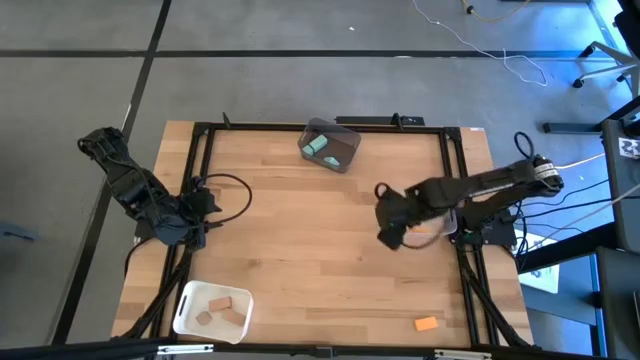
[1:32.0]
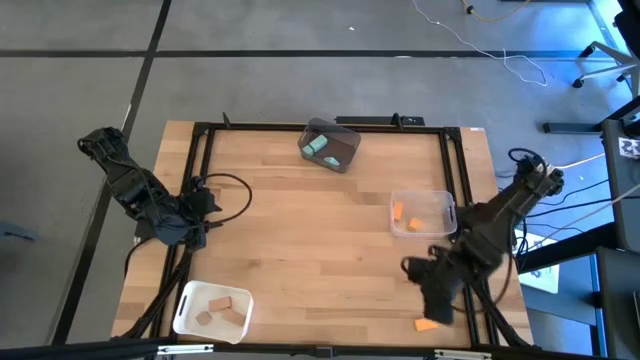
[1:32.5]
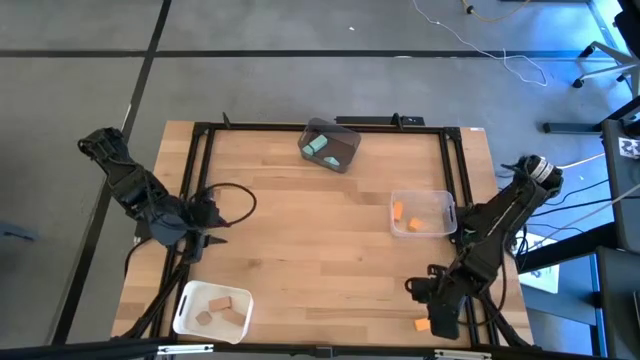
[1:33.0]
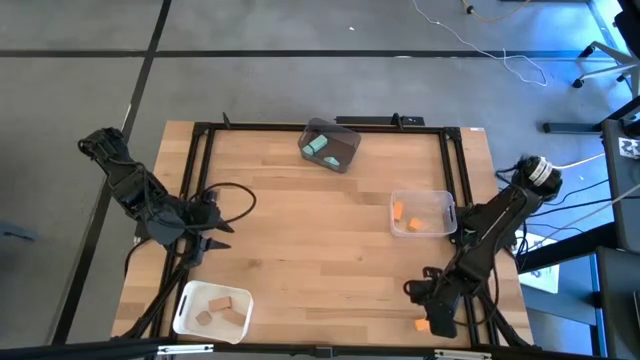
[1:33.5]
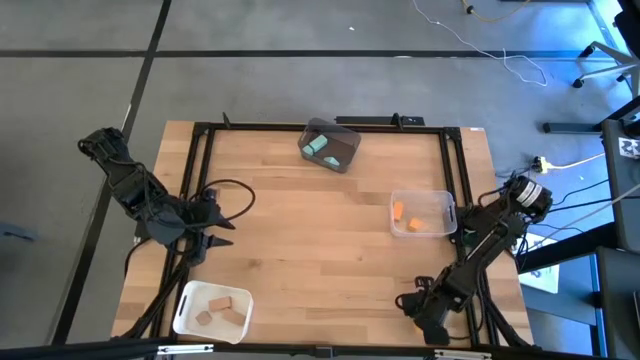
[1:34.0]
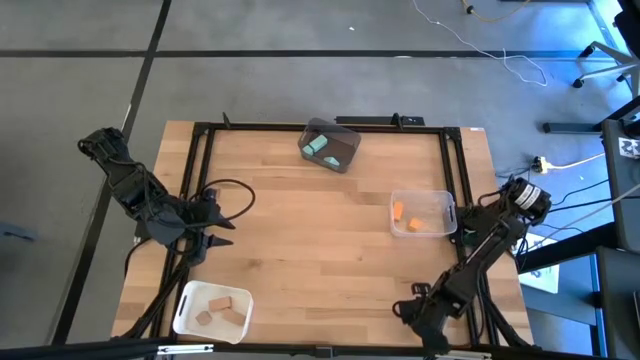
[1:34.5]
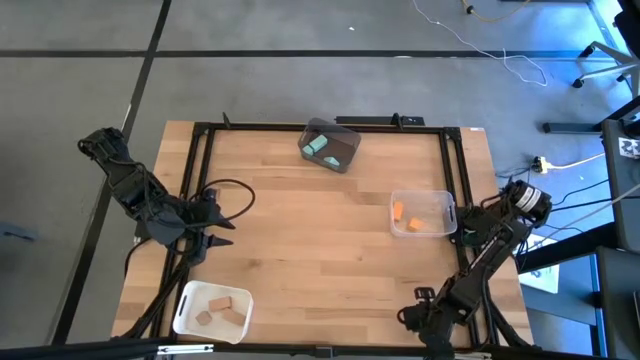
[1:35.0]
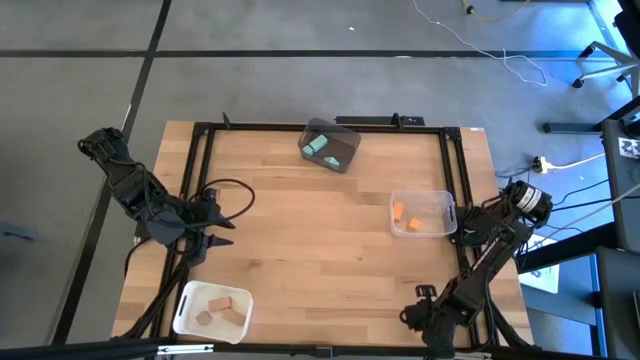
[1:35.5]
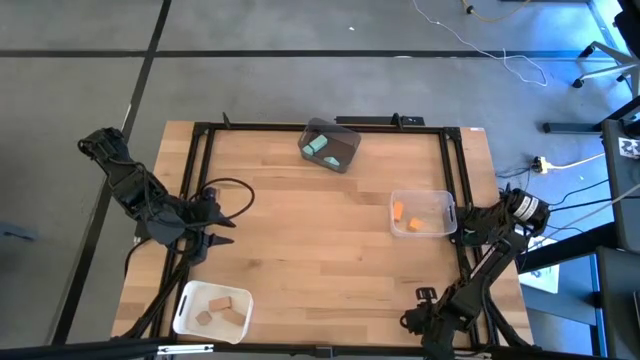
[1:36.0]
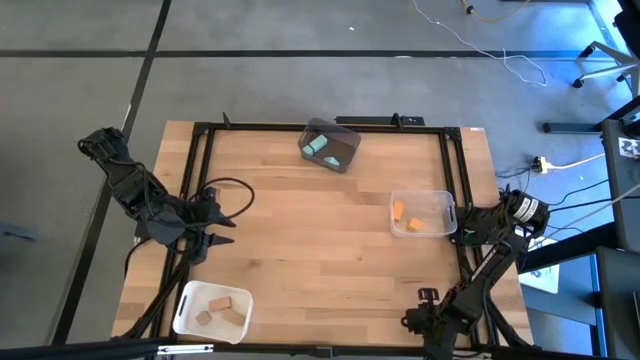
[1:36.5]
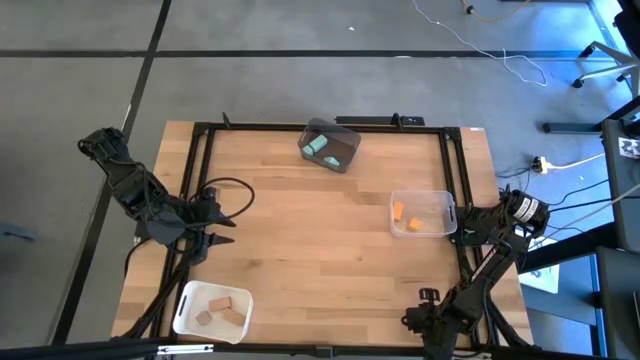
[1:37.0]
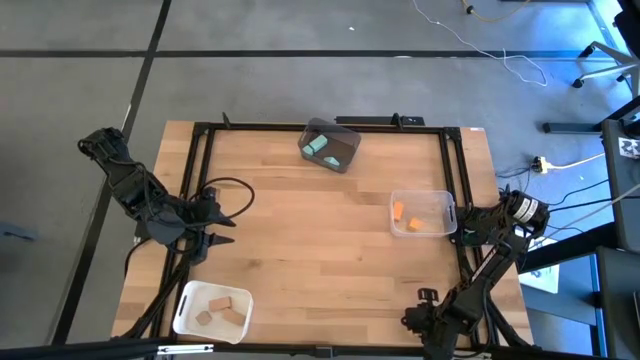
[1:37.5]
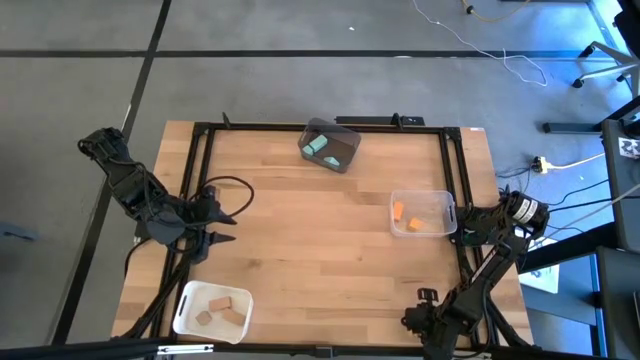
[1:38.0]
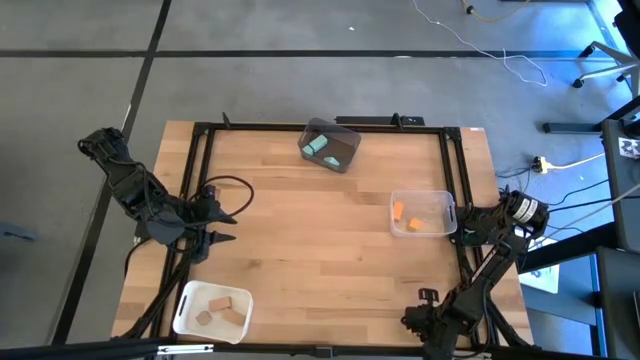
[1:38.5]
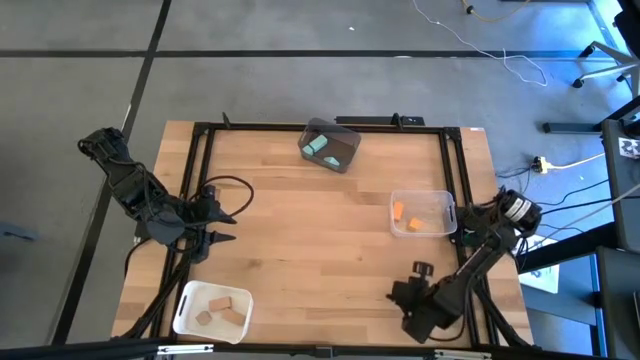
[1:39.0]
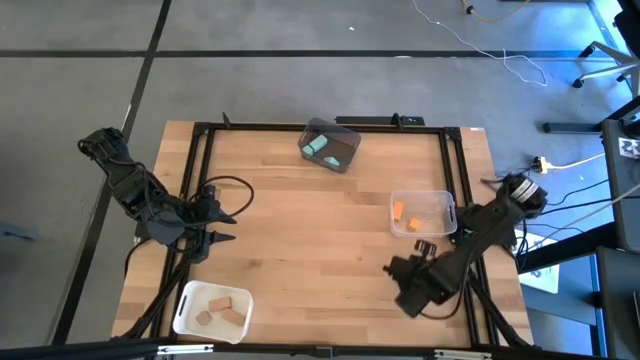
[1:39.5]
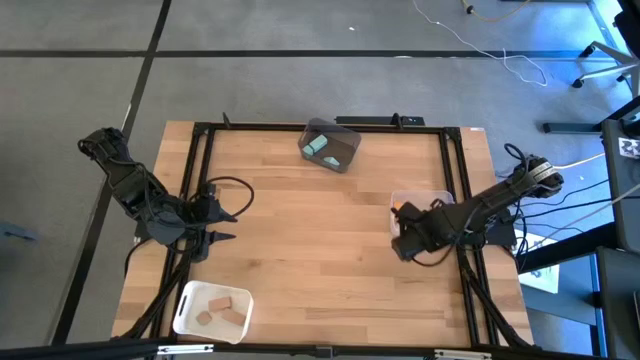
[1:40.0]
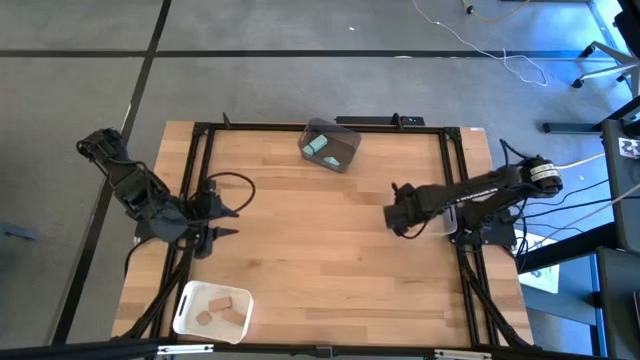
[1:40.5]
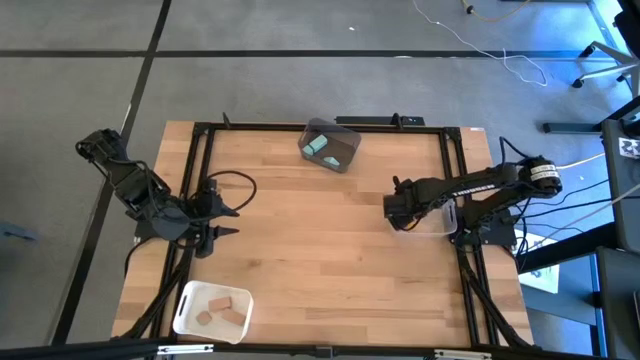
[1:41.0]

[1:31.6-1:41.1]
Task: Sort & place blocks by color
Put the yellow block into the transparent bin

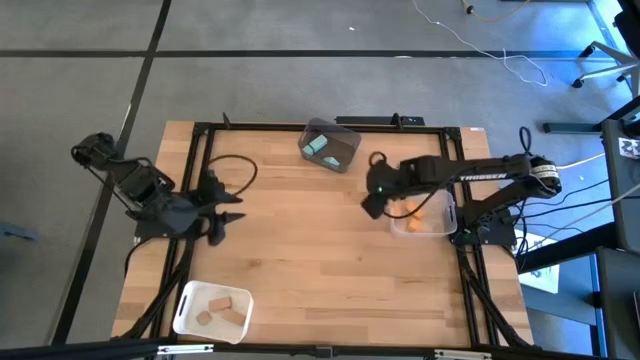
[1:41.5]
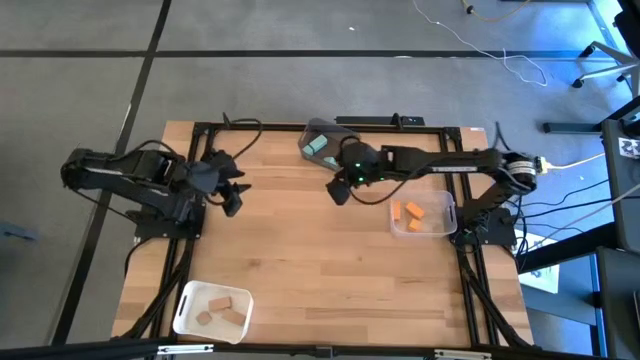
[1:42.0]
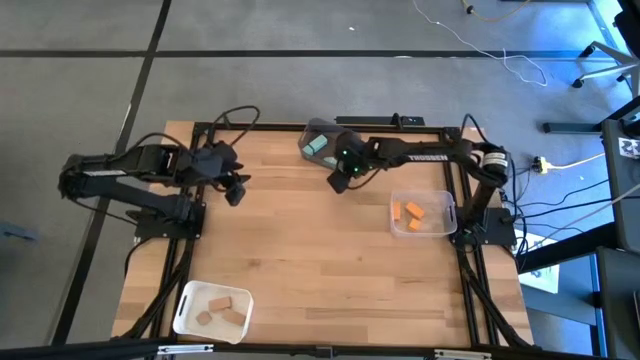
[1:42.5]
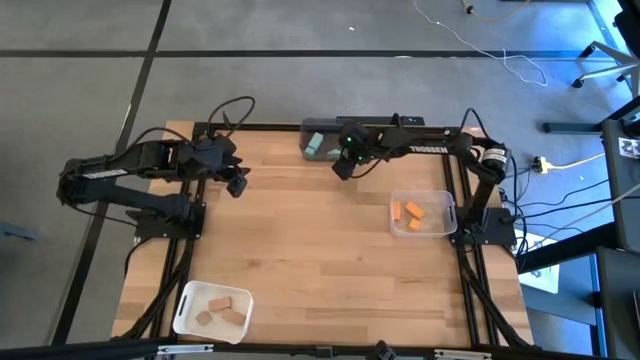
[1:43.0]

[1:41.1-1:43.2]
Adjust the black bin

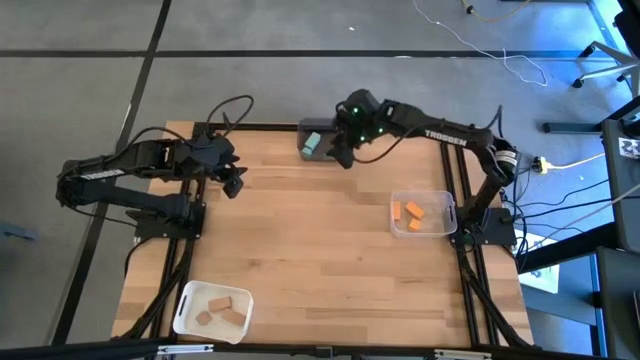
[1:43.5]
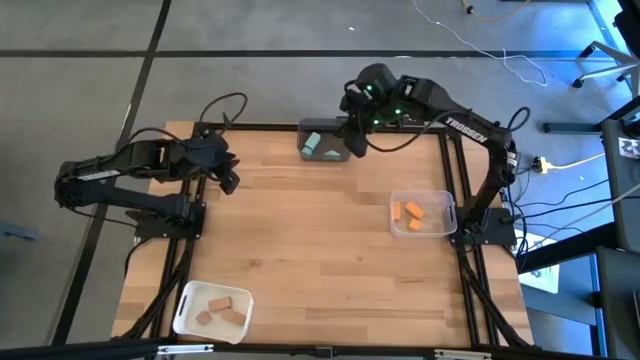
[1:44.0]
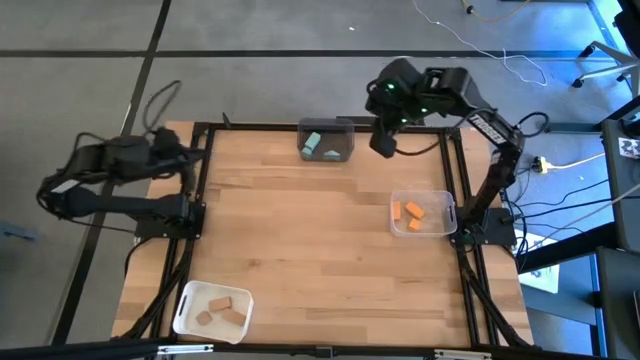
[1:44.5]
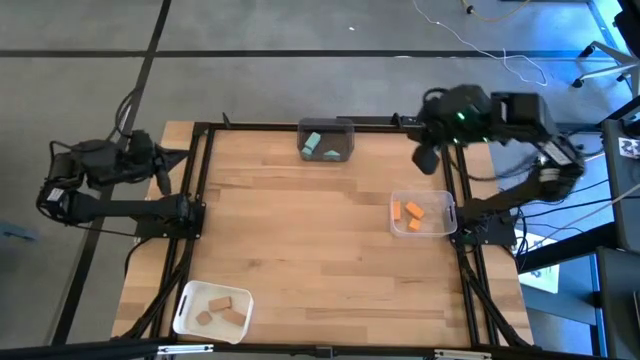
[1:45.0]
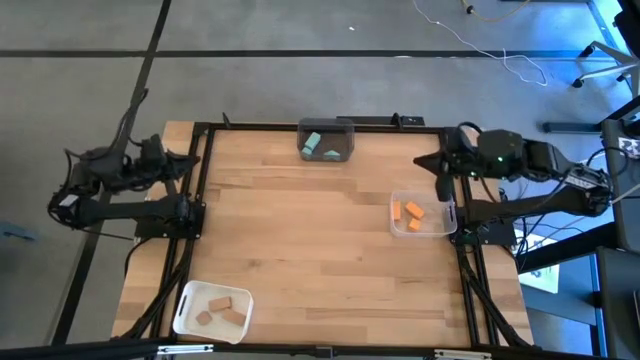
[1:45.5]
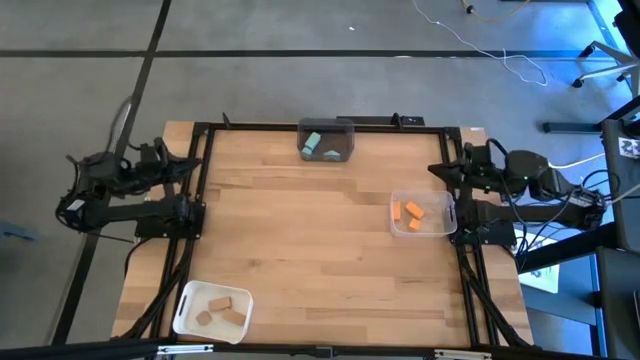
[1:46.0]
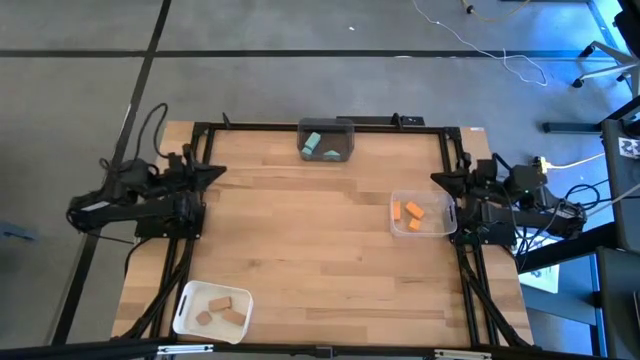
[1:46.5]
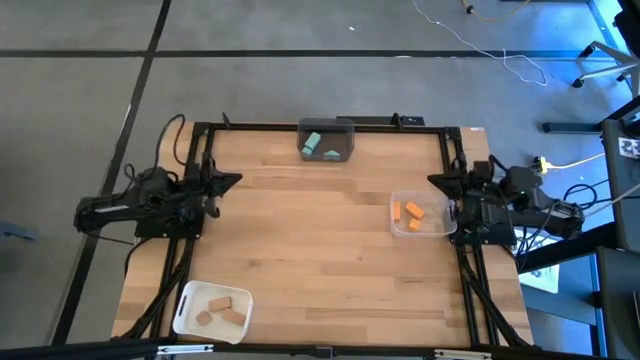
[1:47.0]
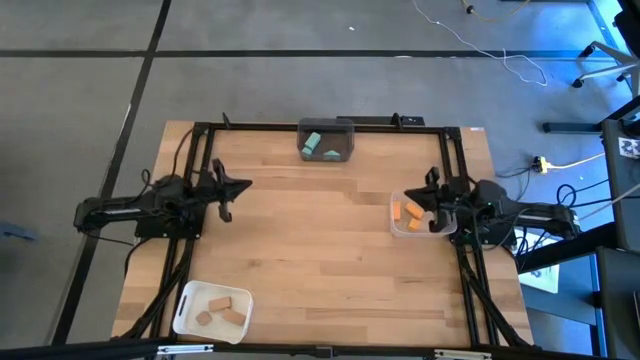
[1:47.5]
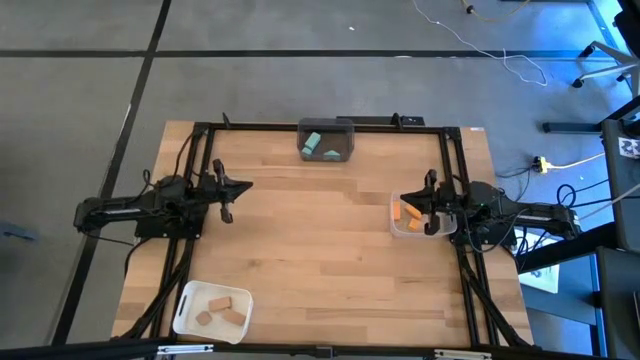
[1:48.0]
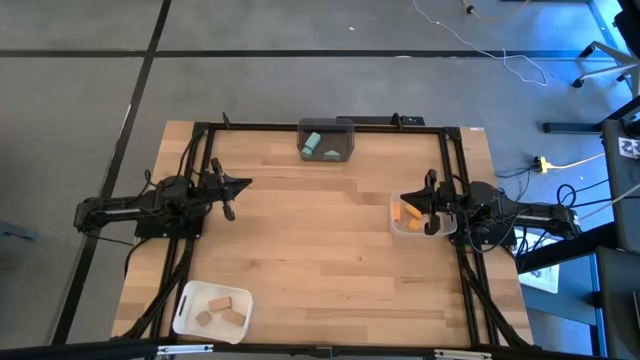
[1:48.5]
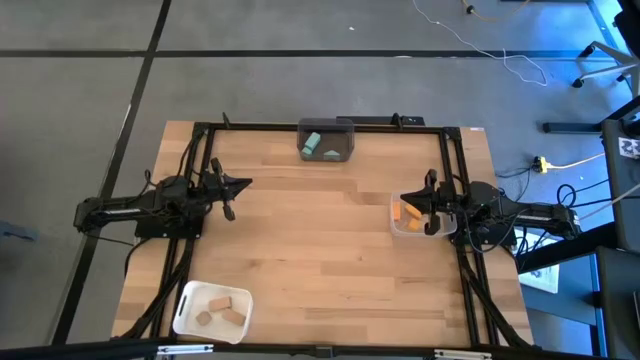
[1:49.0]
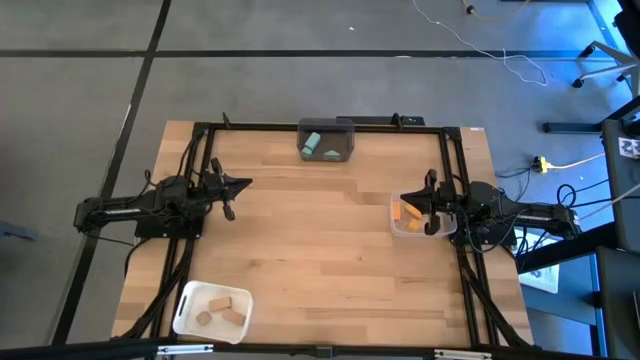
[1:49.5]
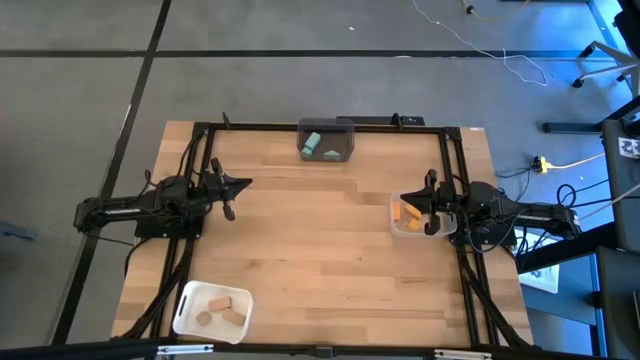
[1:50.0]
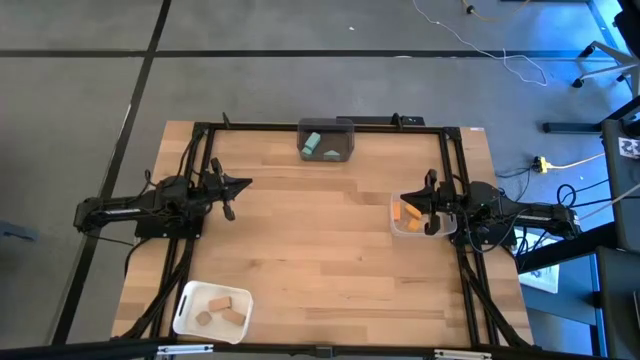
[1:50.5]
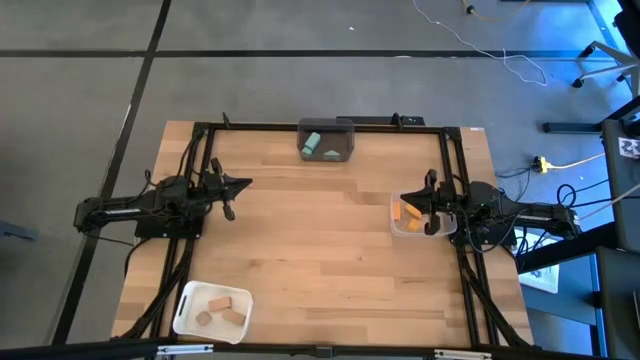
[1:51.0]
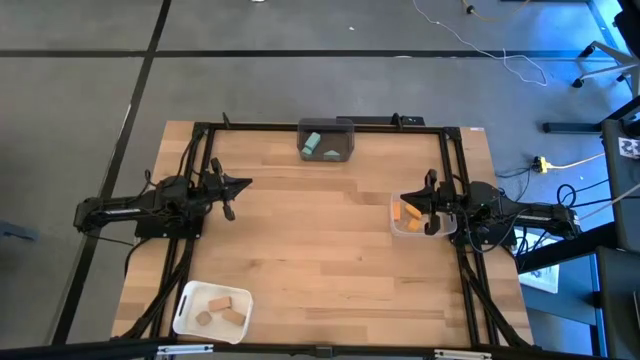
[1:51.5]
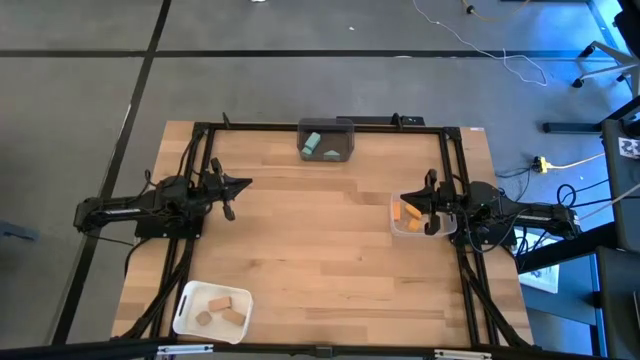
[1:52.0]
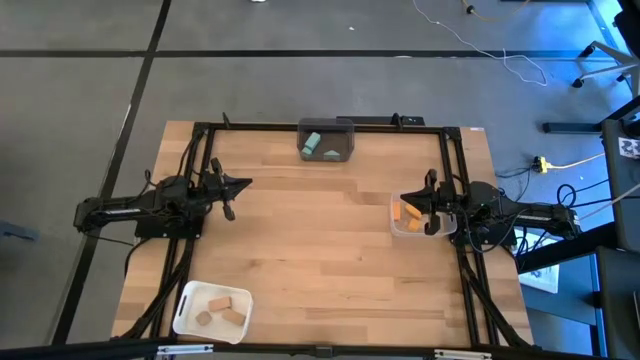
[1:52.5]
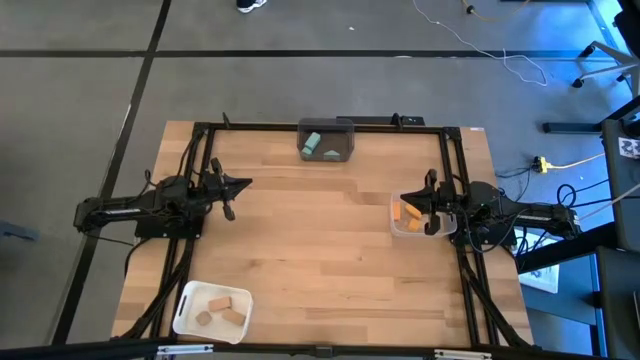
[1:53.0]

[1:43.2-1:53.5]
Return to Home Position
